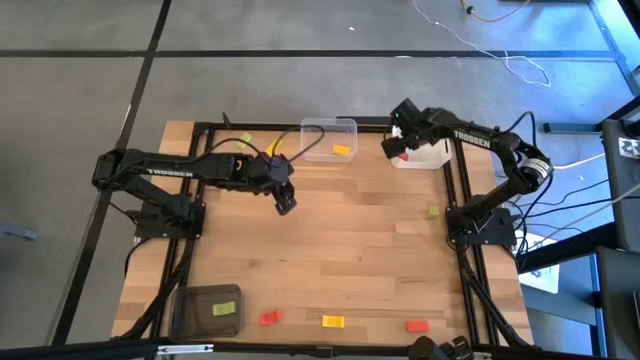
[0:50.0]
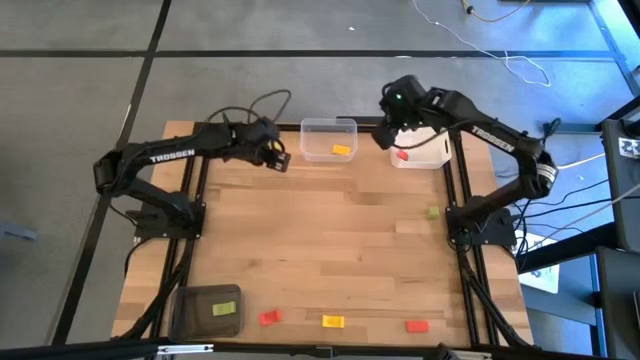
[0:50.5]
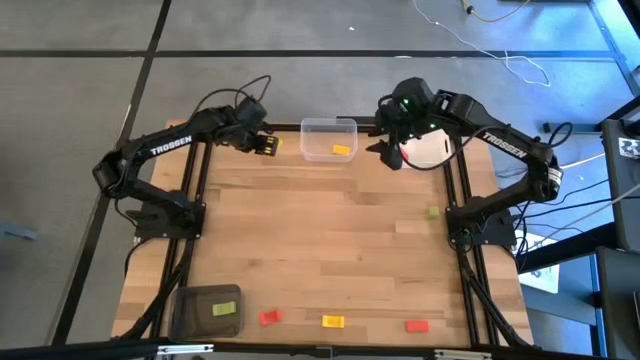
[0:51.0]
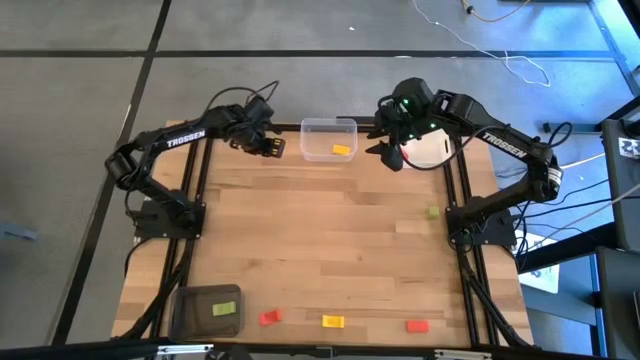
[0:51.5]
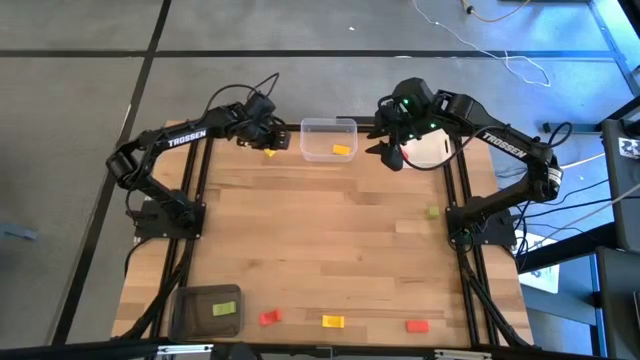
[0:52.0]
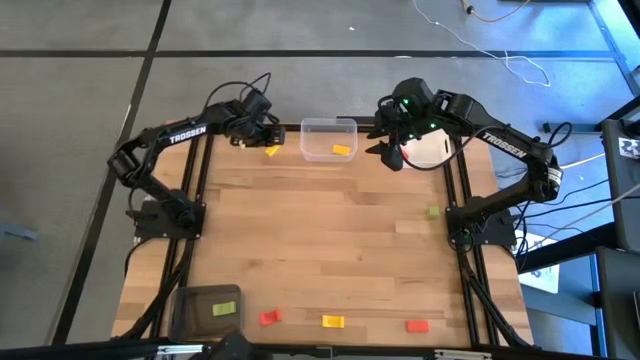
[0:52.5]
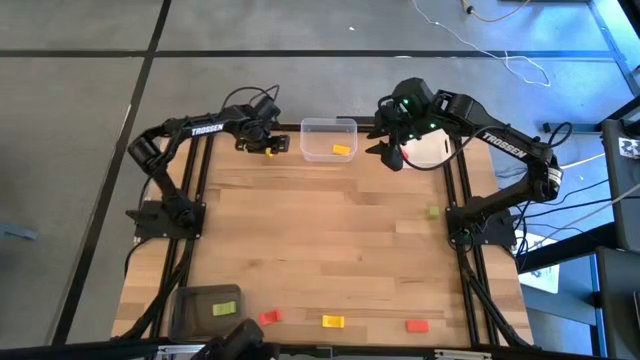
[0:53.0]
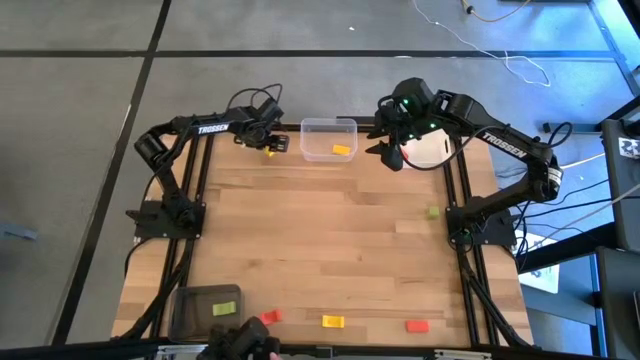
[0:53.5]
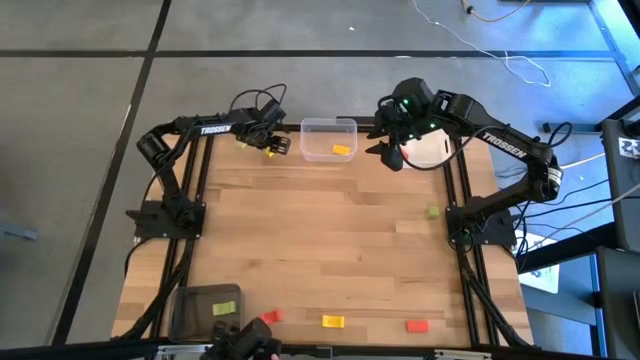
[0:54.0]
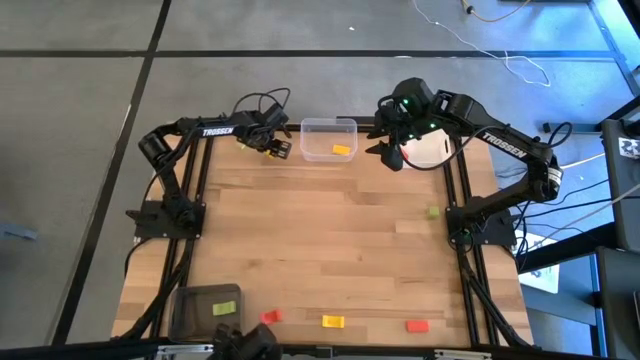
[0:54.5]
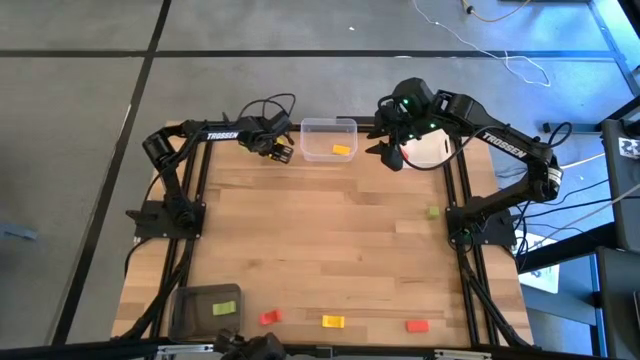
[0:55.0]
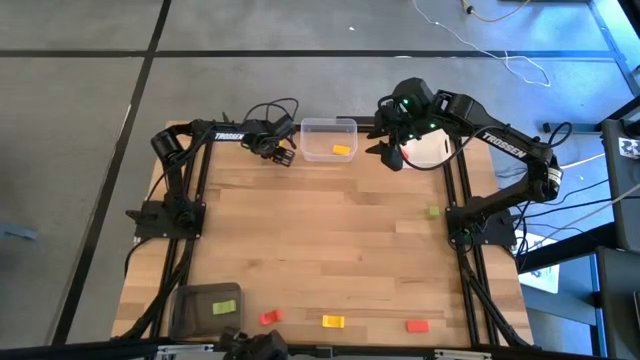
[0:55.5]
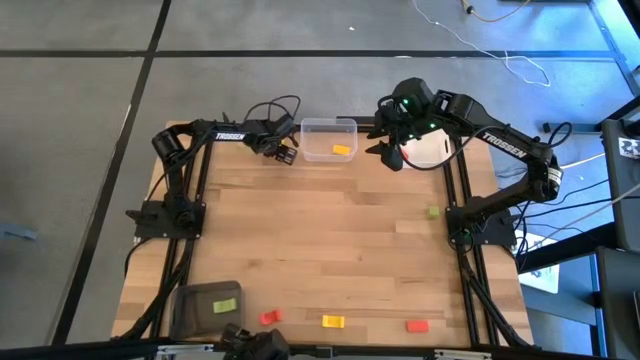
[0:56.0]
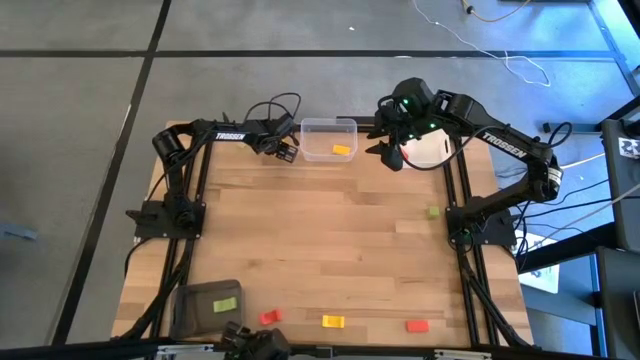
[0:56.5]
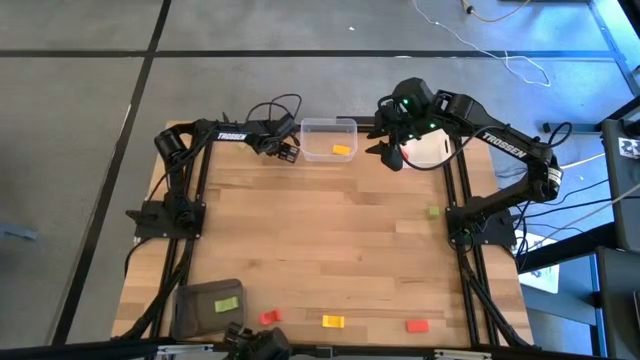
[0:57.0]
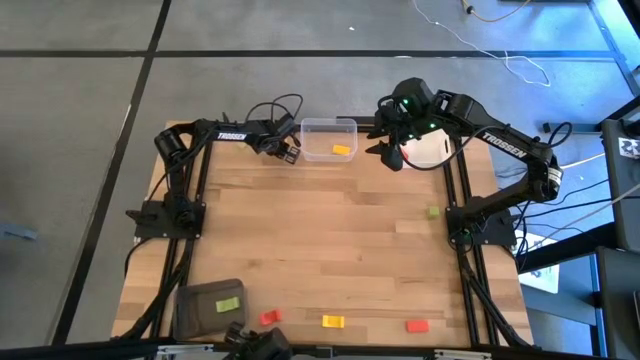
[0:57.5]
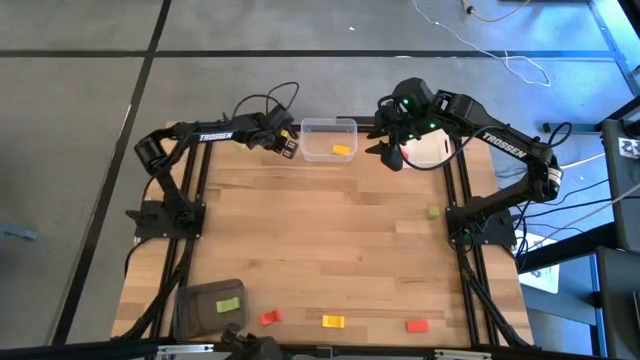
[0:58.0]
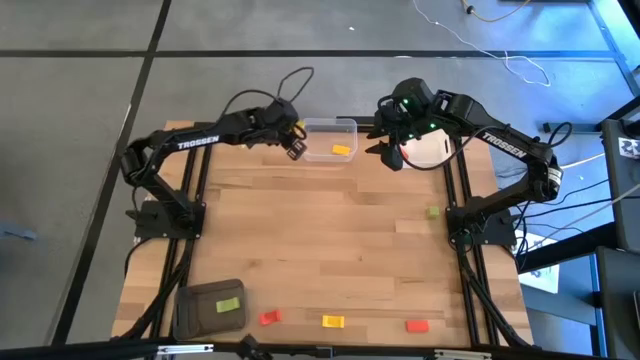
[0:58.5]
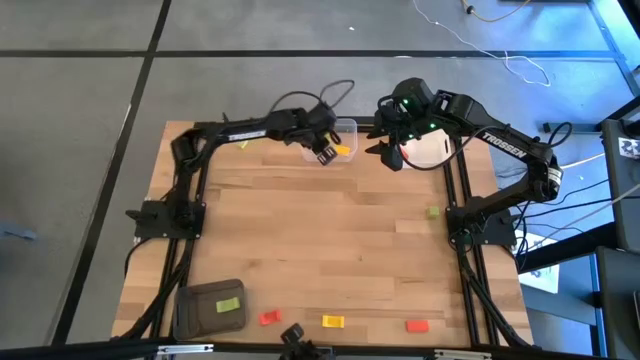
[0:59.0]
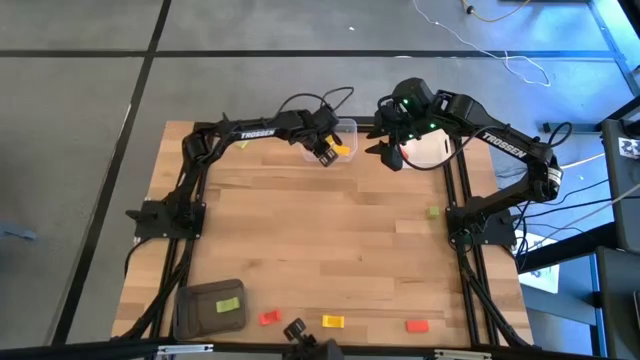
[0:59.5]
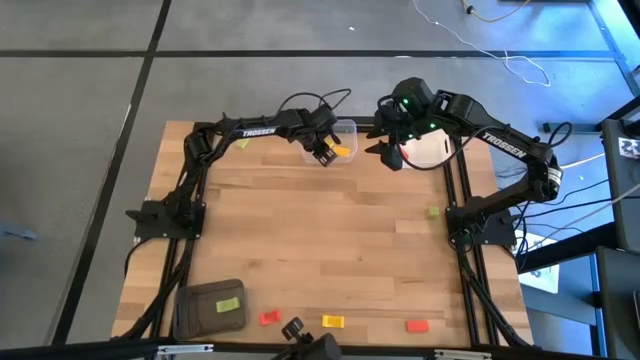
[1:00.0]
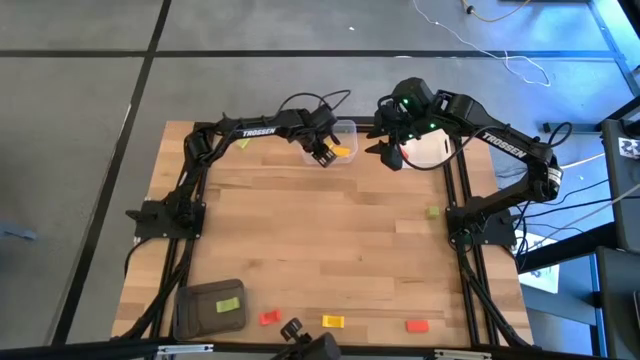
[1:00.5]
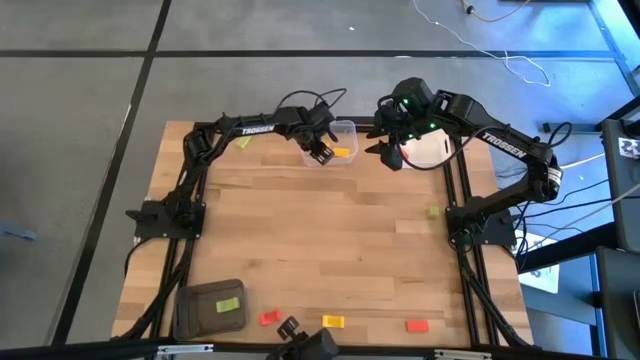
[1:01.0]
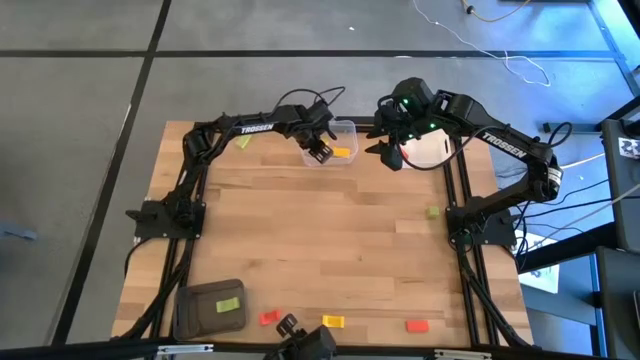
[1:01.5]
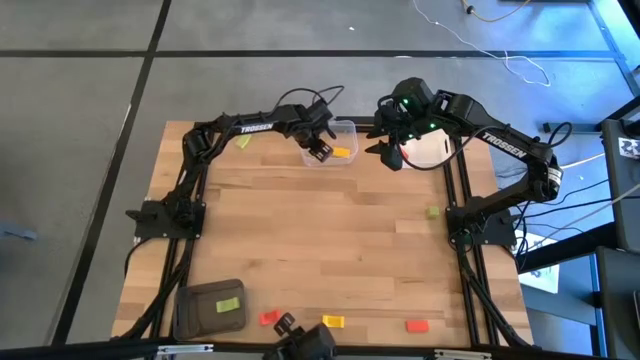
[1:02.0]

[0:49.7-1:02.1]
Task: Sort & place blocks by color
Put the top yellow block into the transparent bin

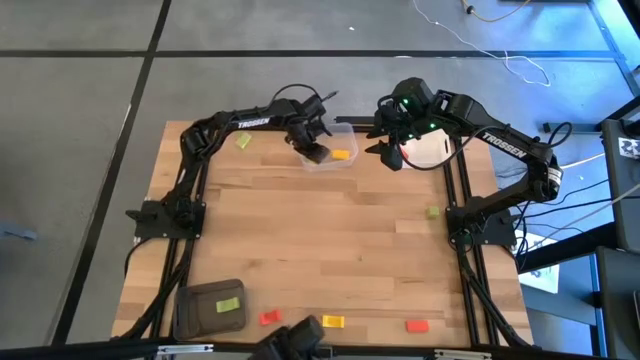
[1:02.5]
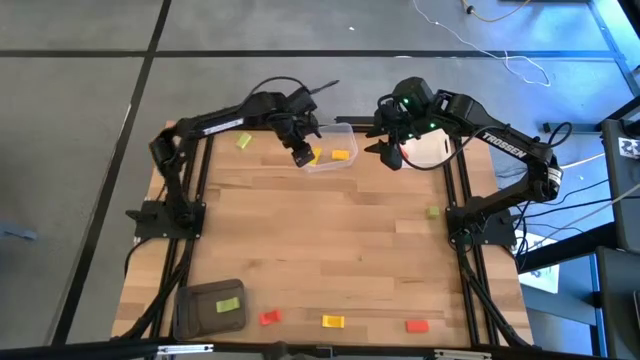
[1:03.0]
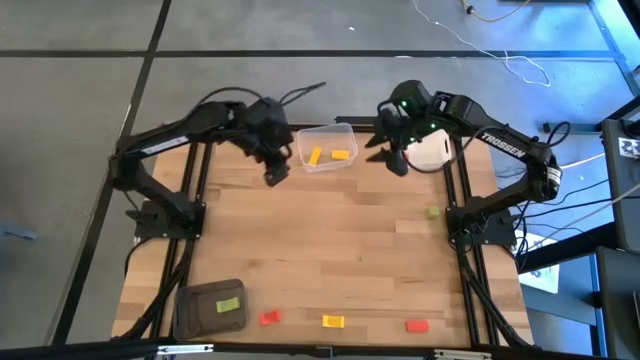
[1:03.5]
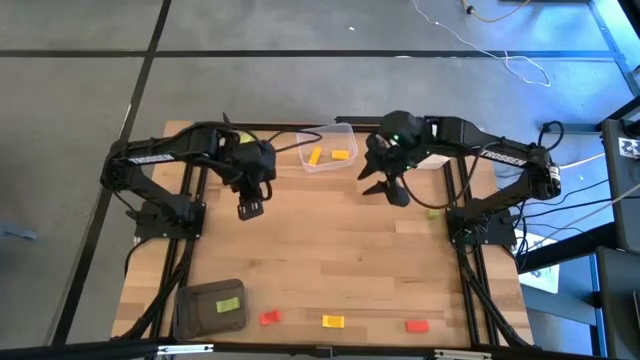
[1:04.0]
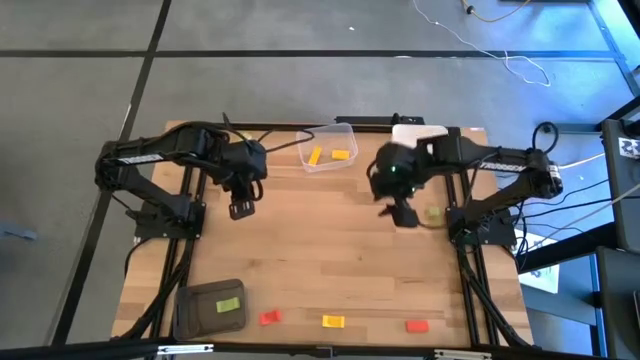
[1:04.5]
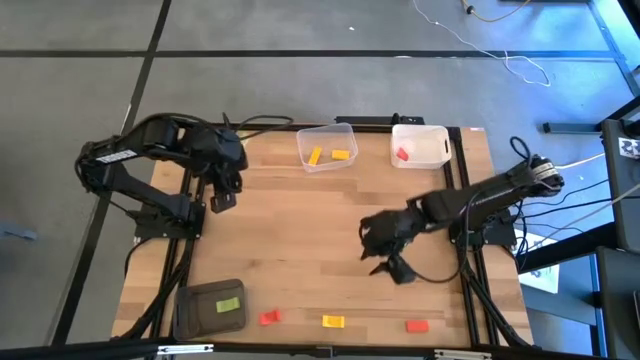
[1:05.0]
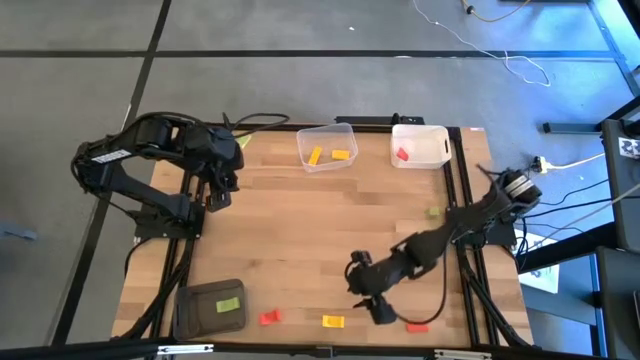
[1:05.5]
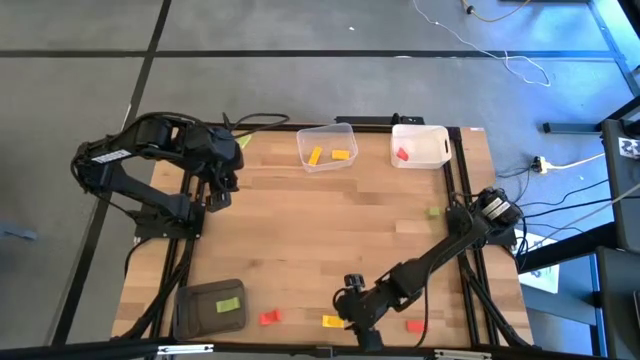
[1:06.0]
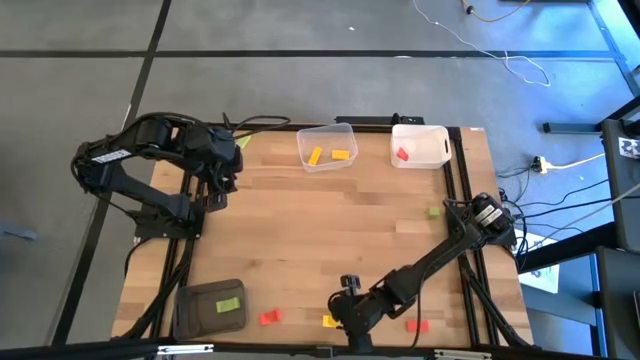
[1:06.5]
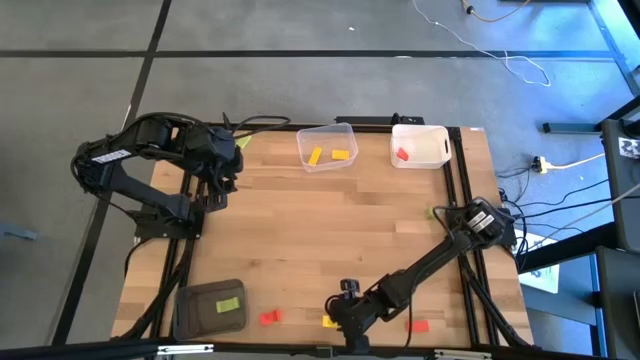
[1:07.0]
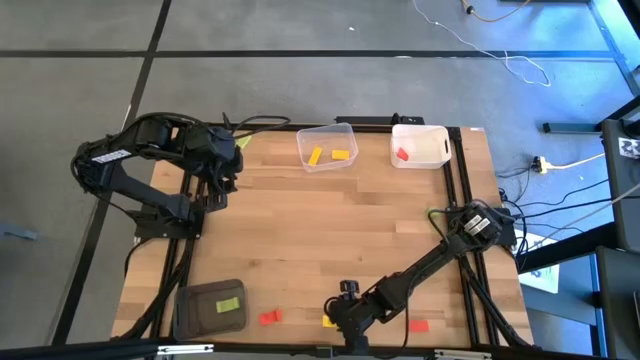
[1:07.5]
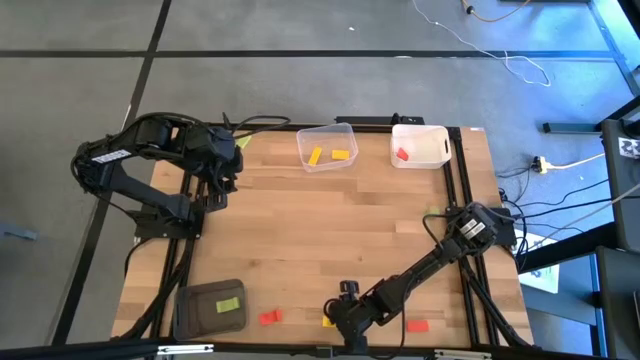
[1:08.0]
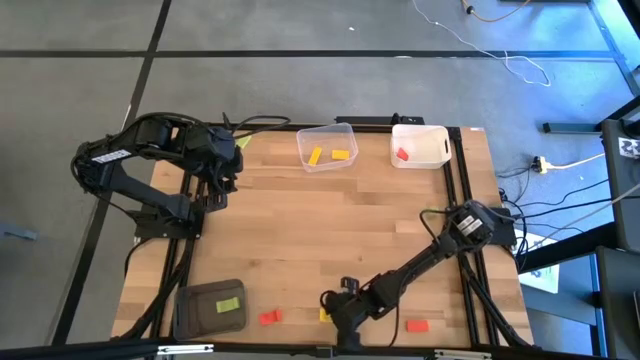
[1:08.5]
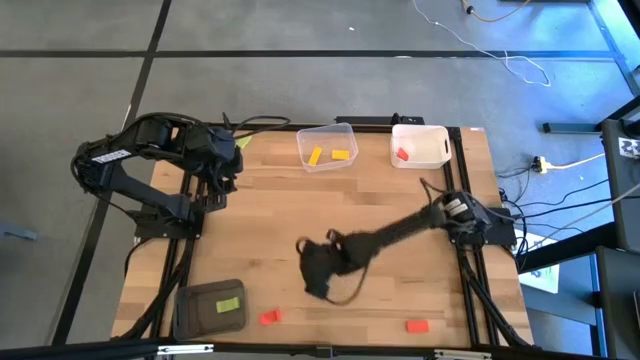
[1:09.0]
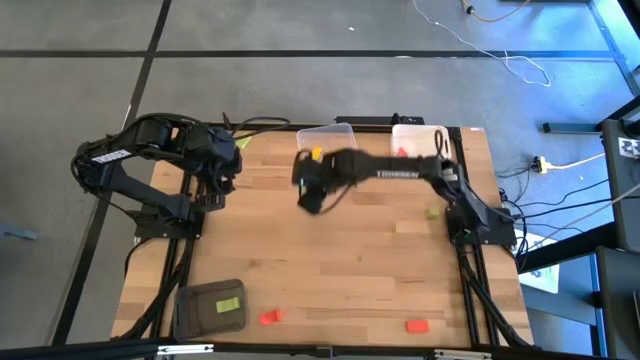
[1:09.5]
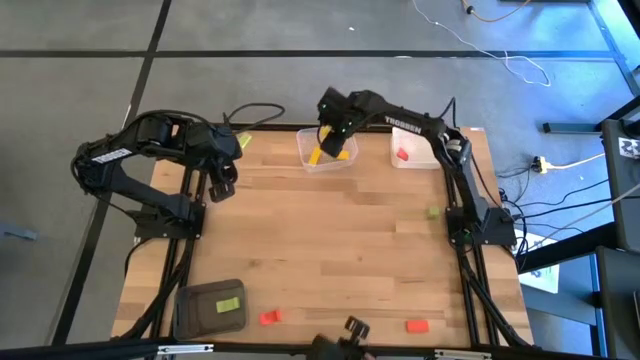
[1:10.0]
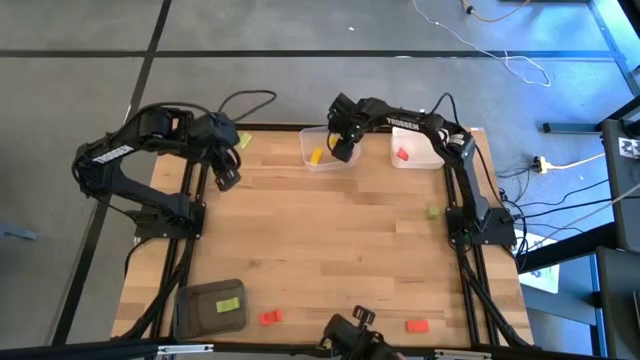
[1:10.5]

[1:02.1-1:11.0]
Put the yellow block into the transparent bin
